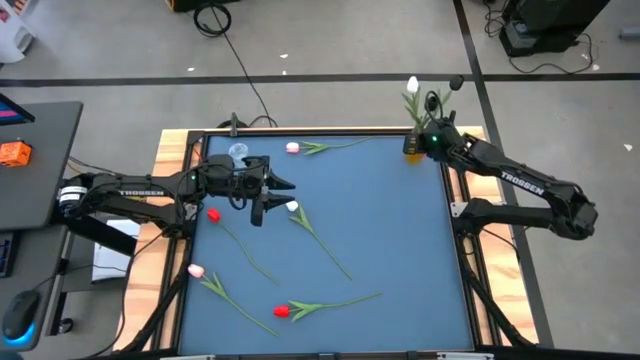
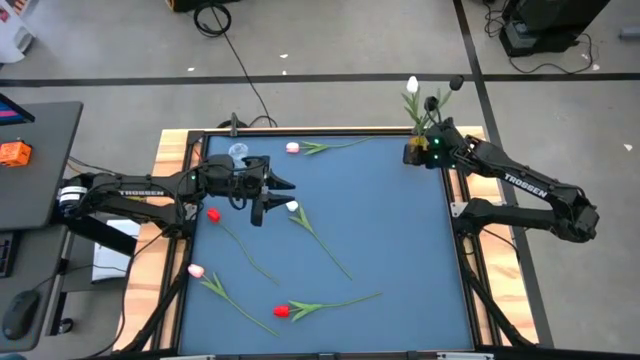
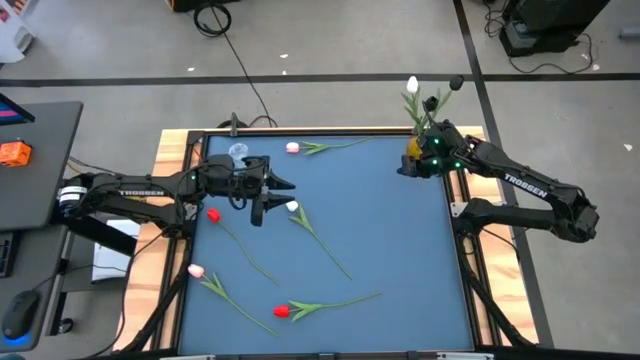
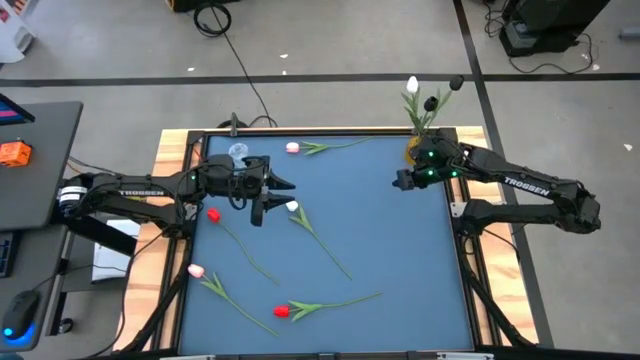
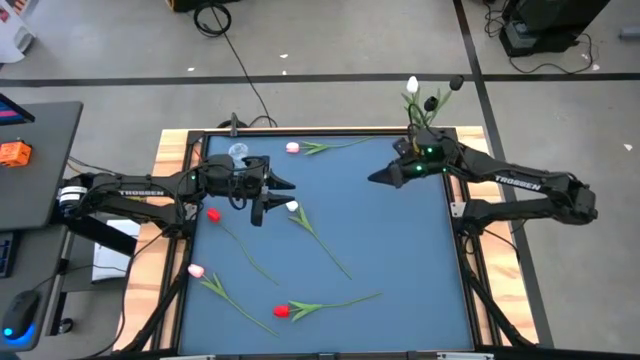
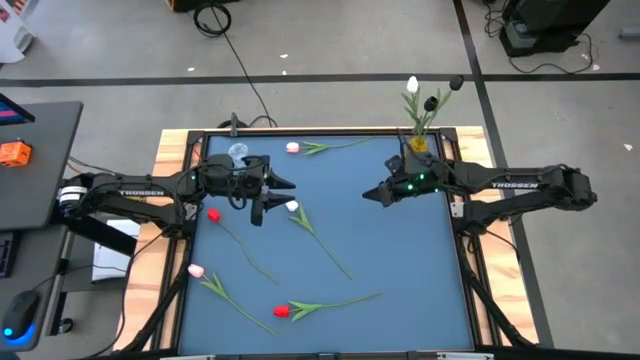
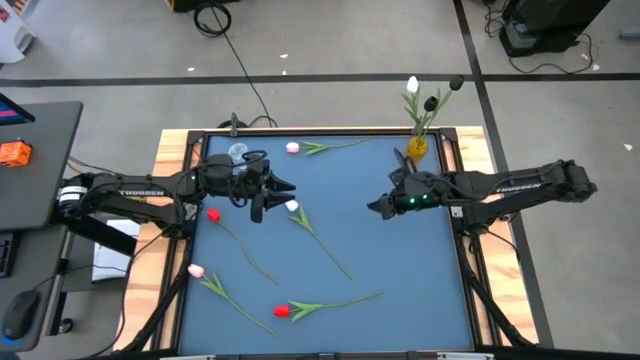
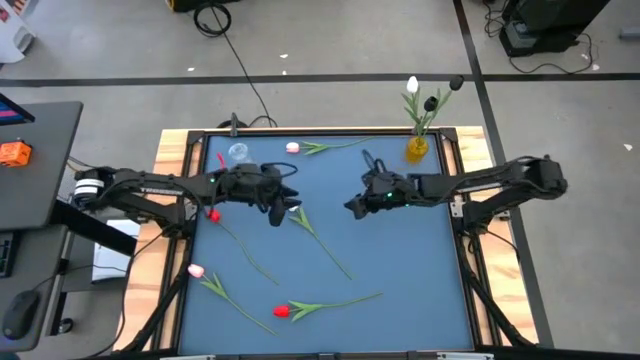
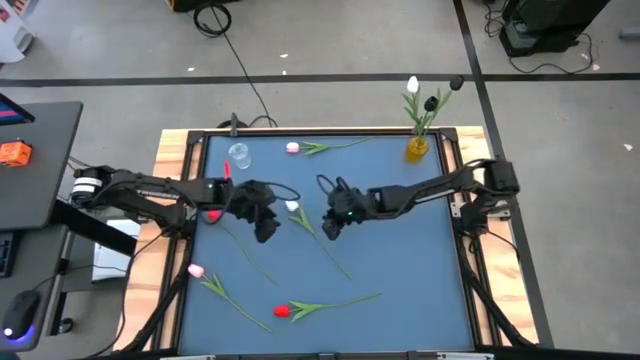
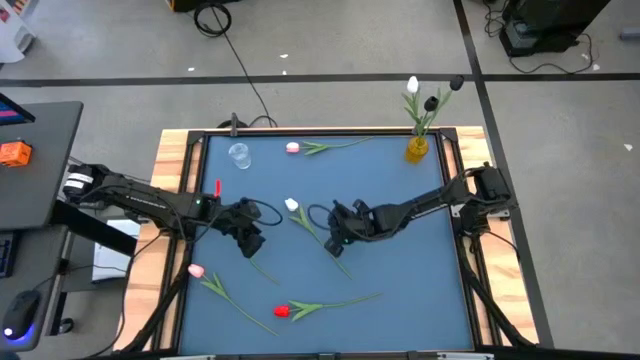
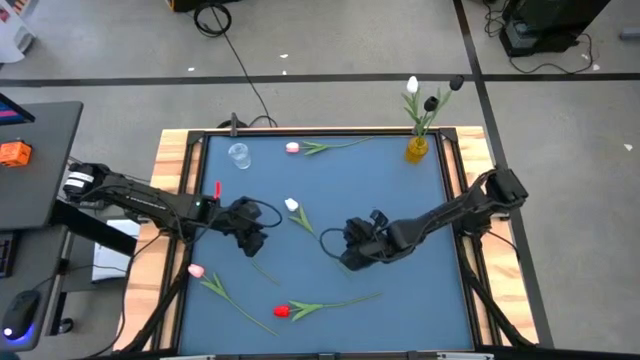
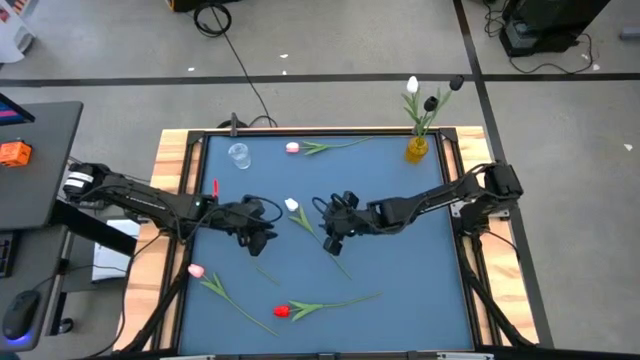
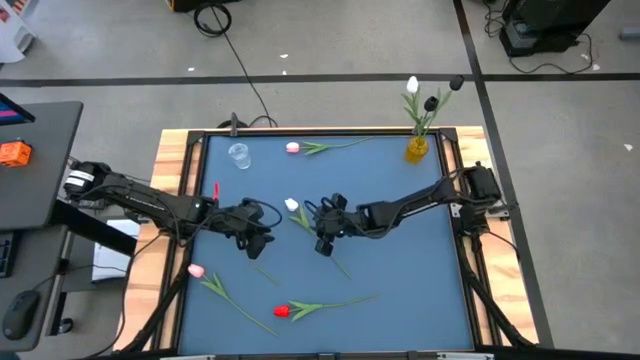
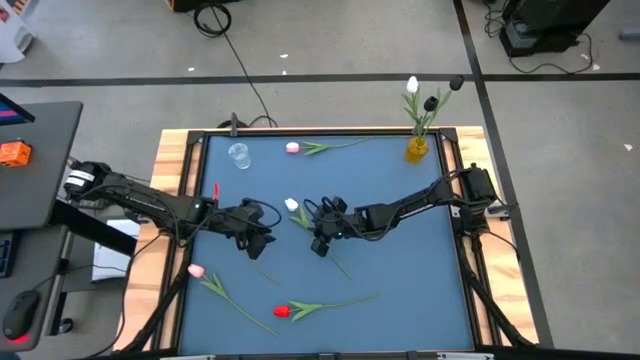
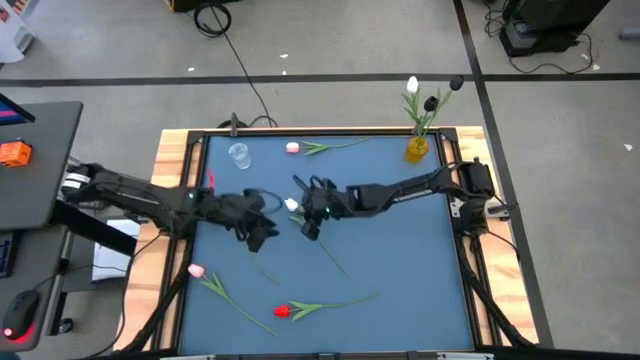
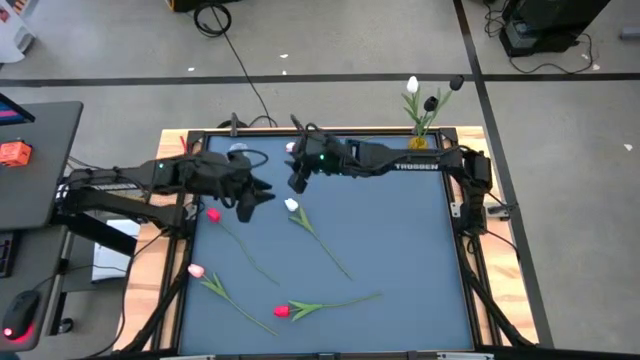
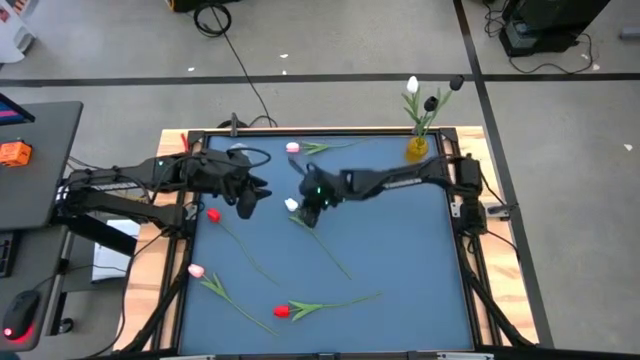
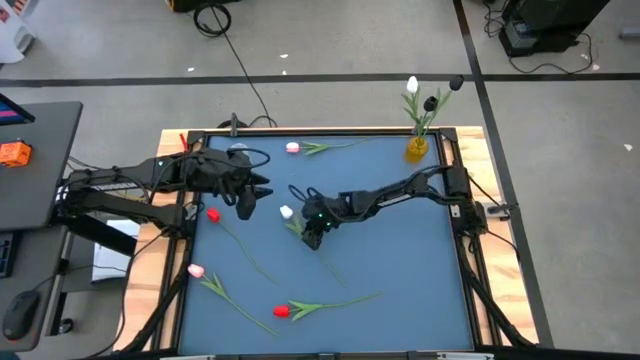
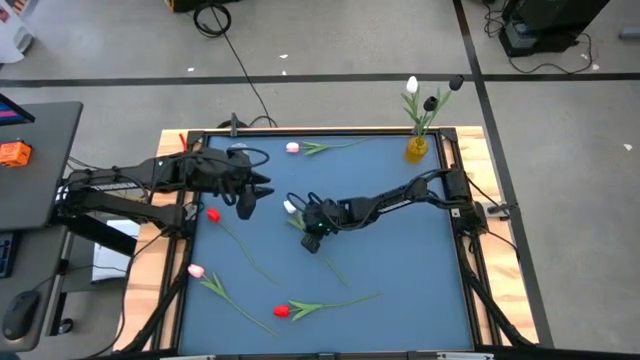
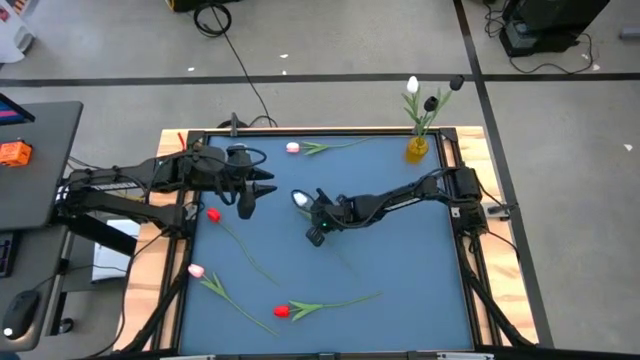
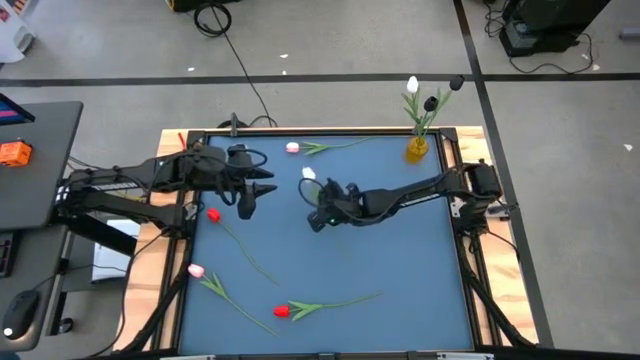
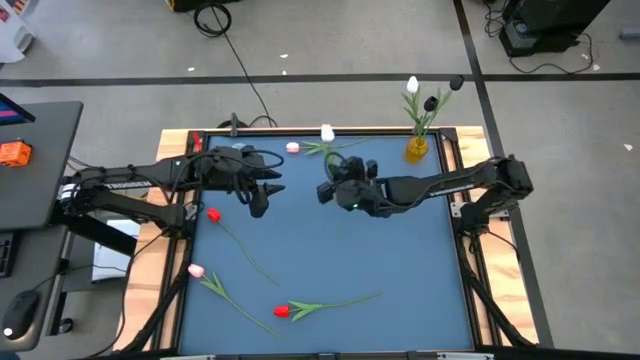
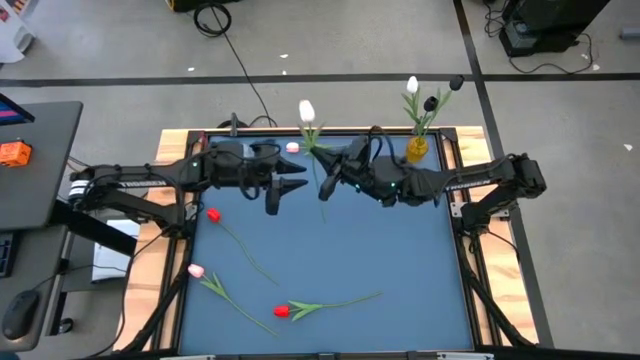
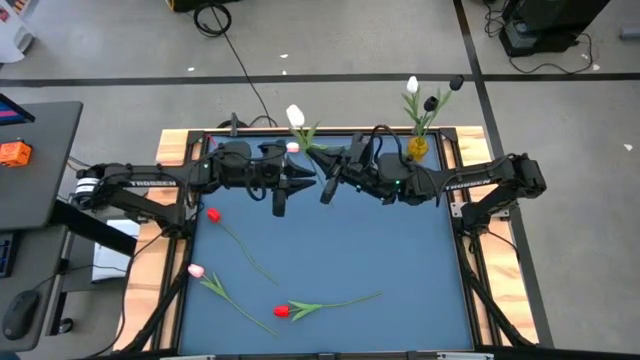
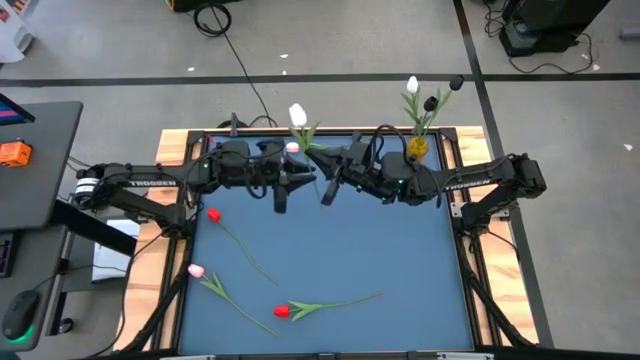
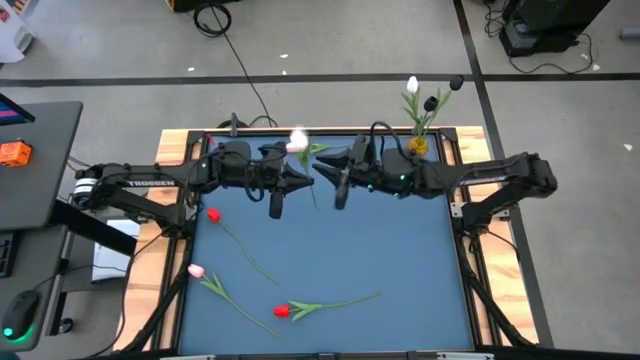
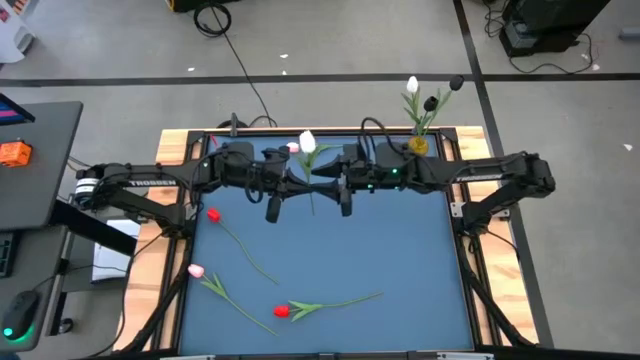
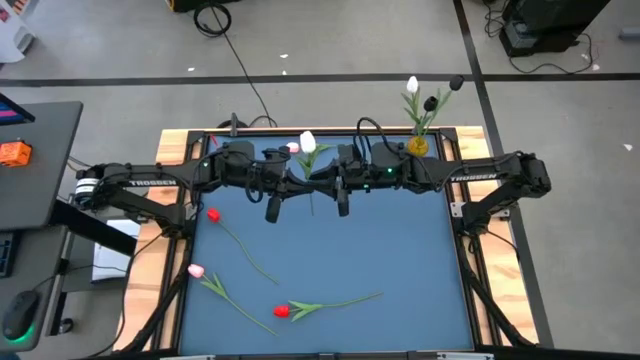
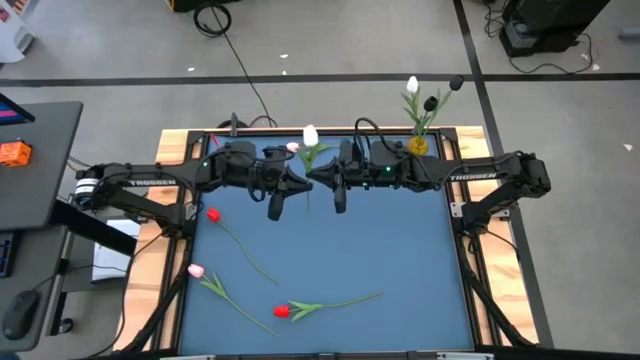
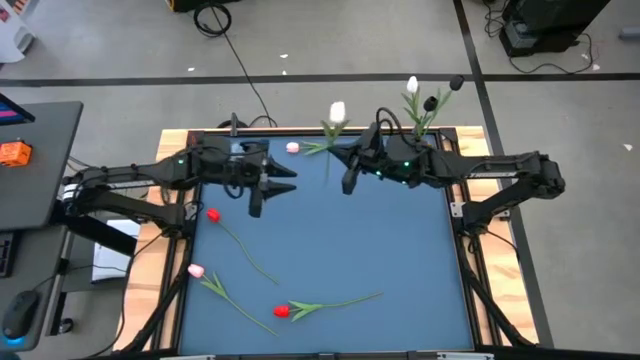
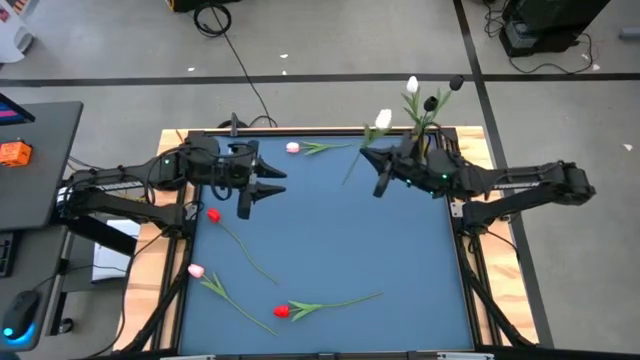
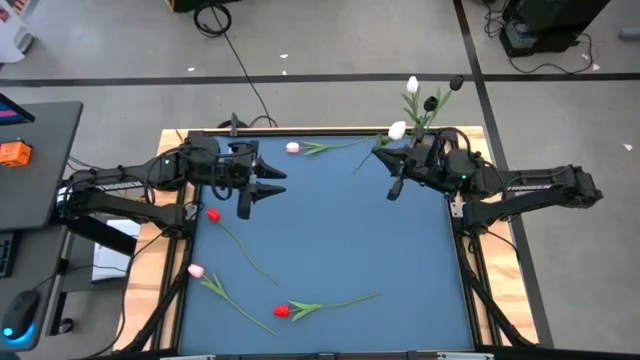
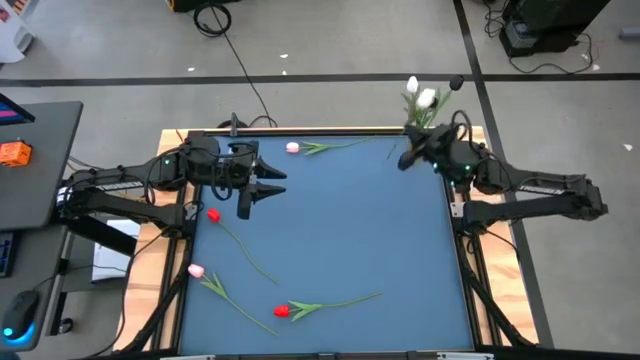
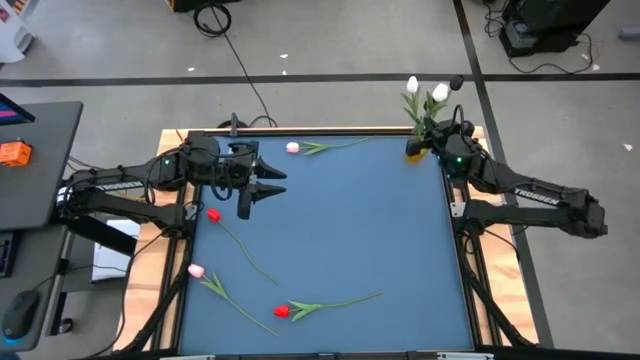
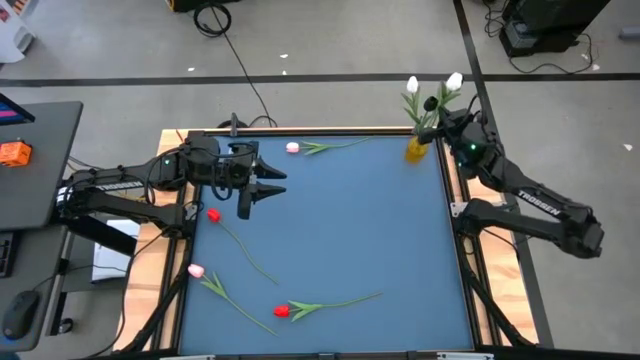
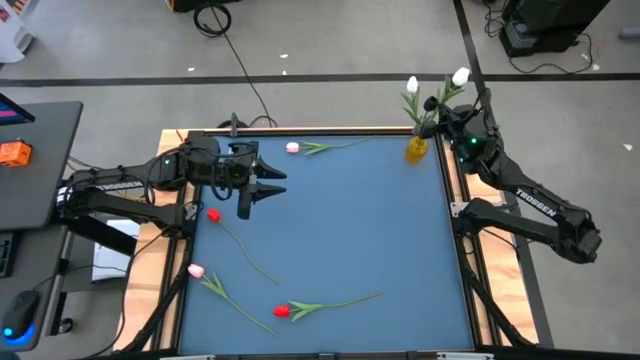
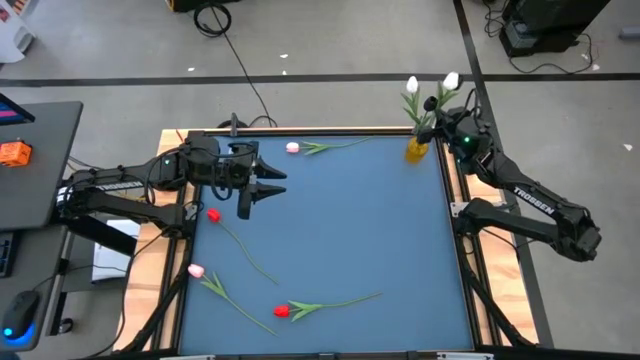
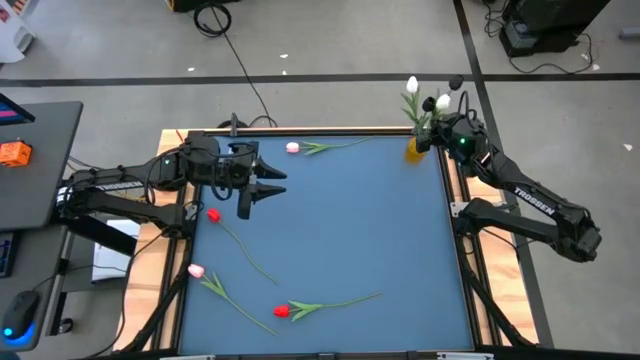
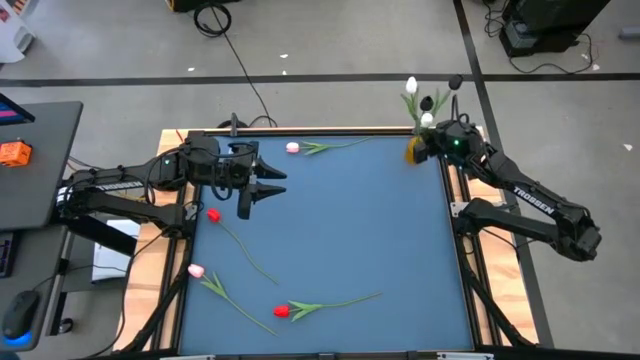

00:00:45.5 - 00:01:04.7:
Task: Sort flowers into vase by color
Put the white tulip into the yellow vase
